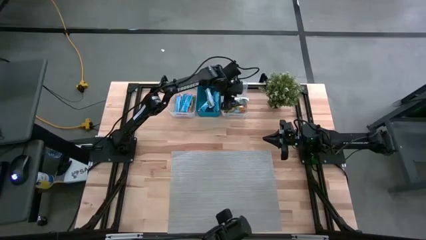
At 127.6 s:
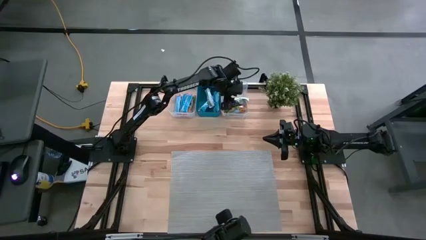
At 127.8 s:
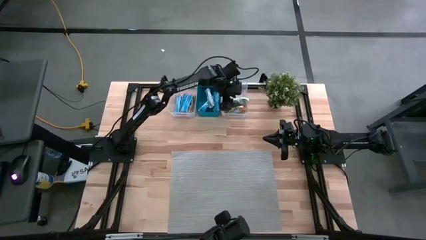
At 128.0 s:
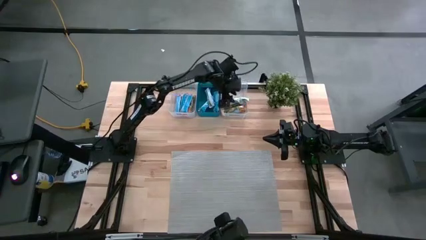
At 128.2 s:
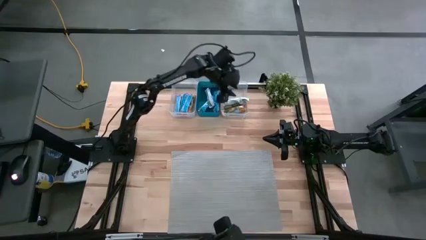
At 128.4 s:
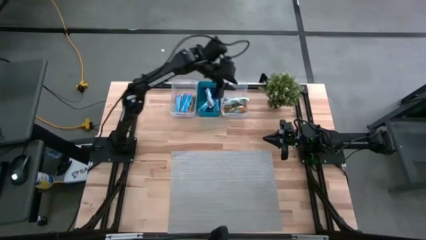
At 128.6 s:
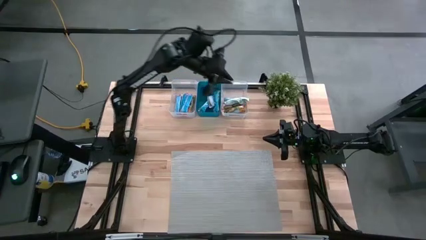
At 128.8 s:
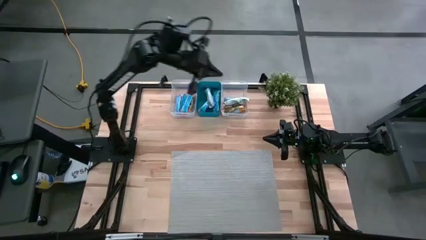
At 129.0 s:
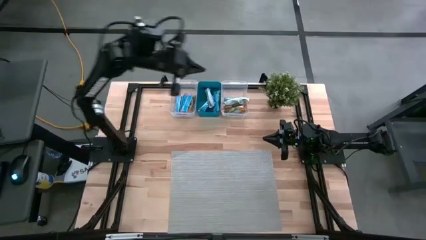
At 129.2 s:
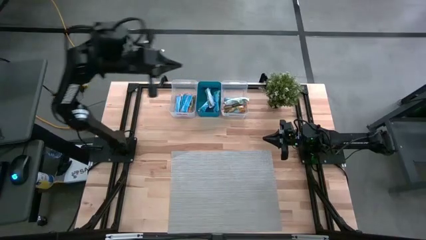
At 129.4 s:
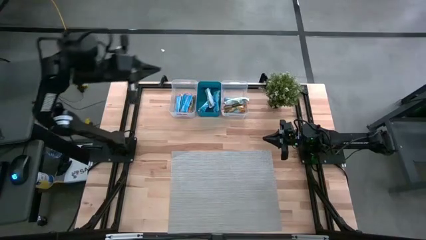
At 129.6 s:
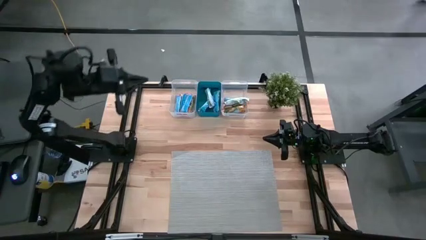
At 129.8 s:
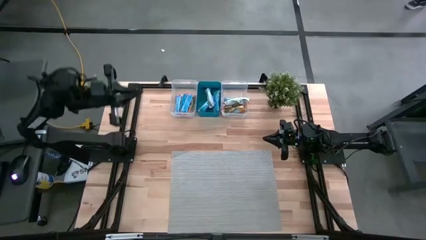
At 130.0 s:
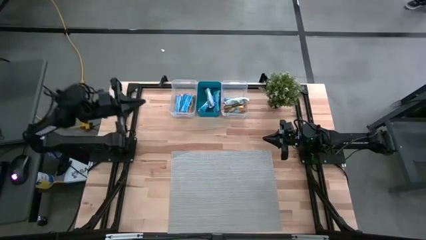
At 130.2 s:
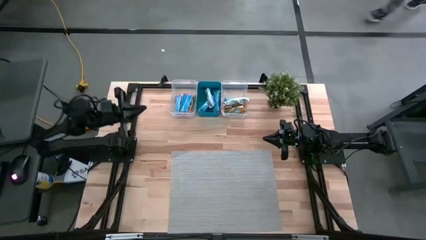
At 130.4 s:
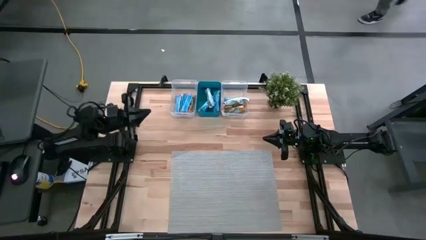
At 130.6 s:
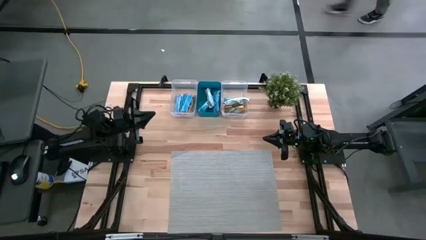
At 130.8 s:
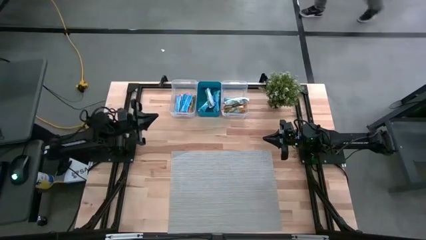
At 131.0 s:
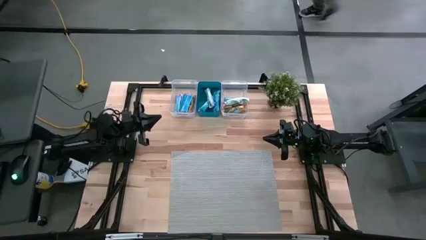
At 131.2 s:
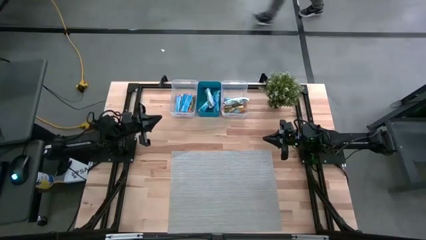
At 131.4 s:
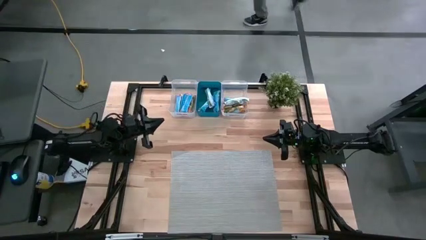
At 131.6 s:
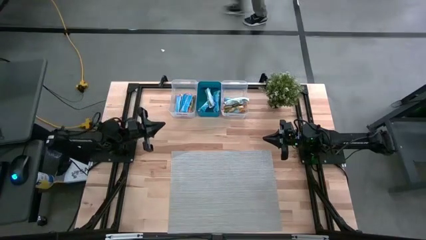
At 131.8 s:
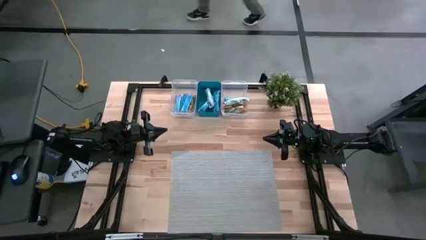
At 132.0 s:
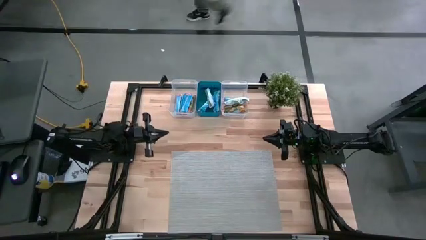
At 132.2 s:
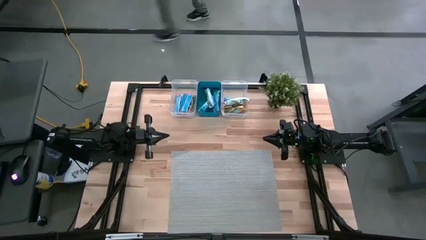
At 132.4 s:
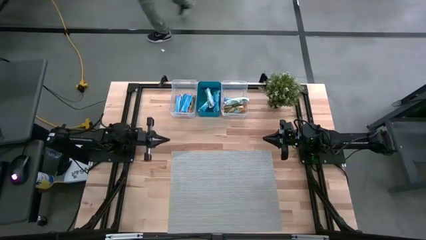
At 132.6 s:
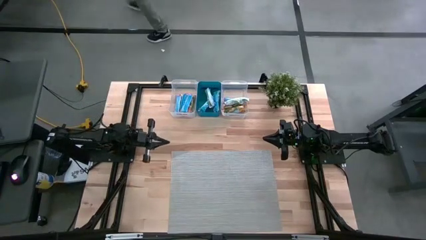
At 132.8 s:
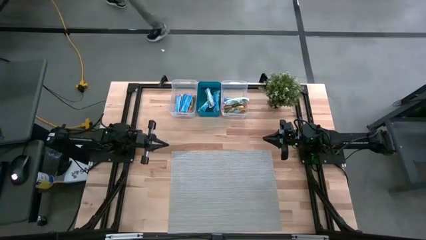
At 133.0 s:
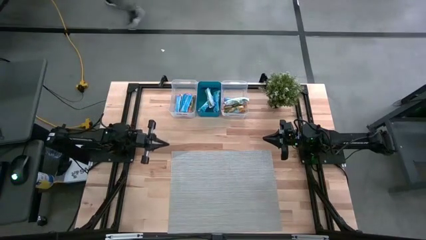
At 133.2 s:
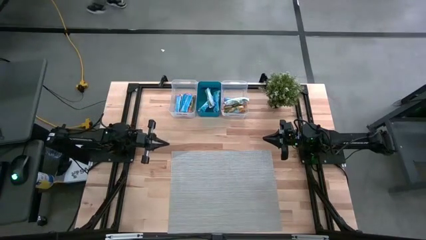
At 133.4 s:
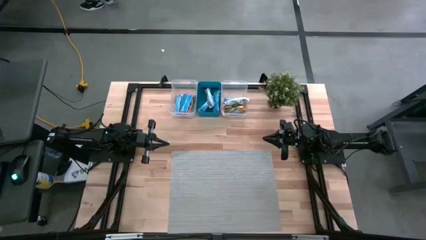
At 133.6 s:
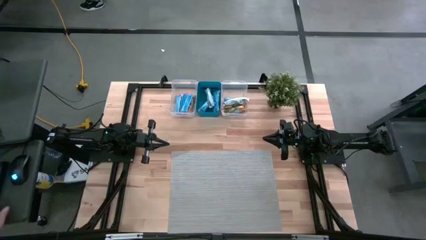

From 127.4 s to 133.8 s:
Task: Pick and place Granola Bars by type
Return to Home Position

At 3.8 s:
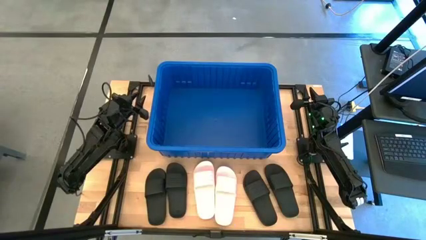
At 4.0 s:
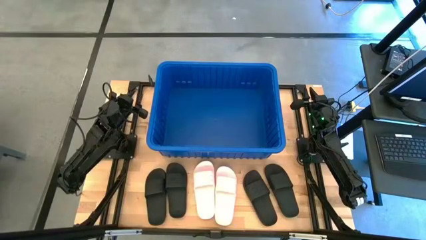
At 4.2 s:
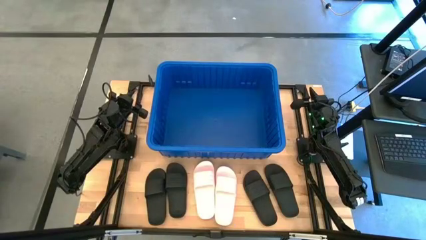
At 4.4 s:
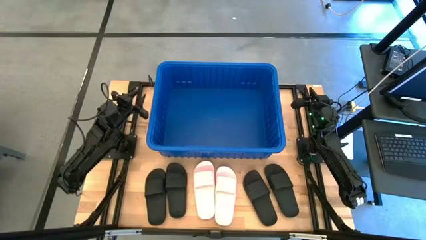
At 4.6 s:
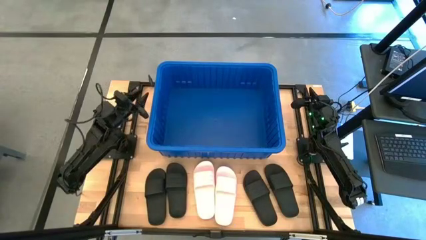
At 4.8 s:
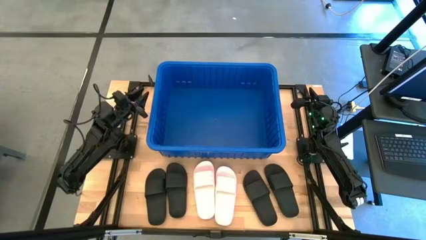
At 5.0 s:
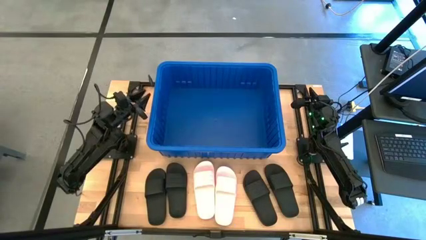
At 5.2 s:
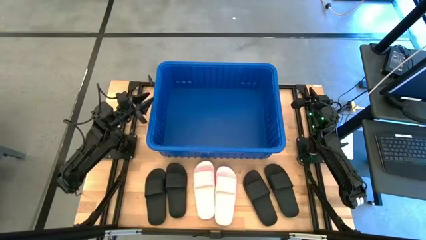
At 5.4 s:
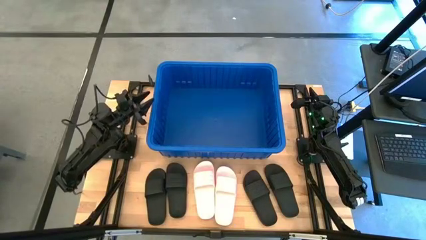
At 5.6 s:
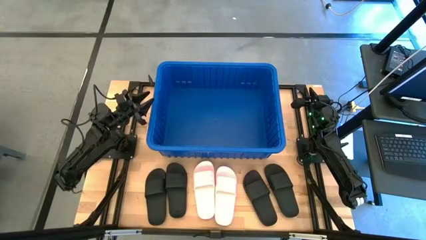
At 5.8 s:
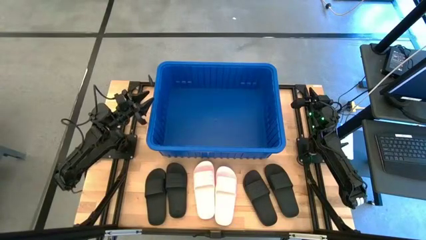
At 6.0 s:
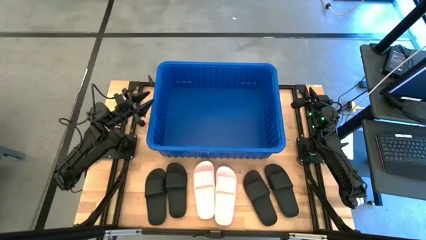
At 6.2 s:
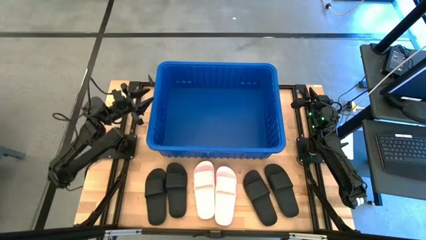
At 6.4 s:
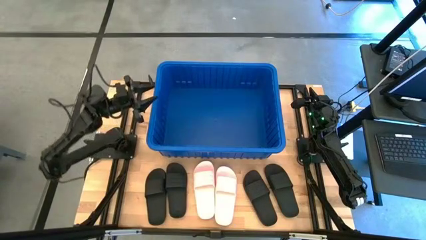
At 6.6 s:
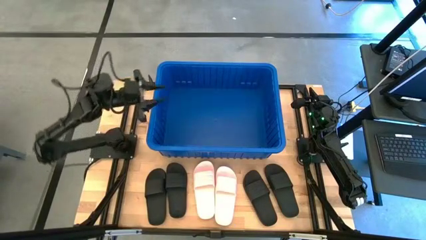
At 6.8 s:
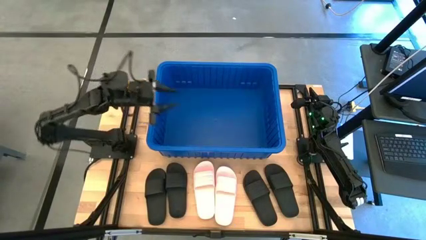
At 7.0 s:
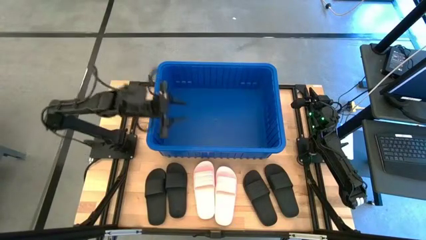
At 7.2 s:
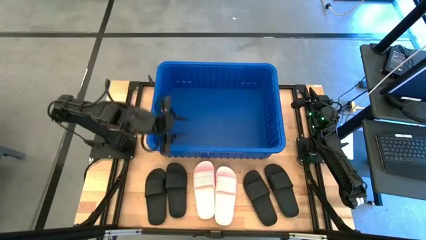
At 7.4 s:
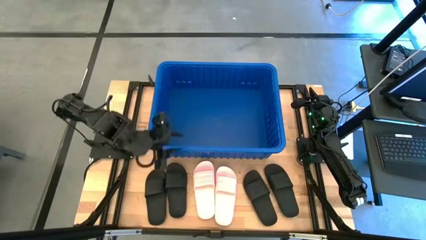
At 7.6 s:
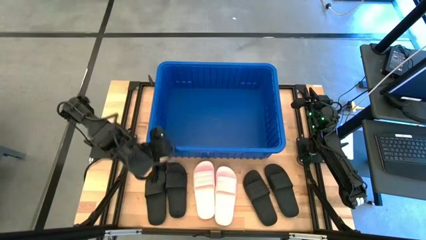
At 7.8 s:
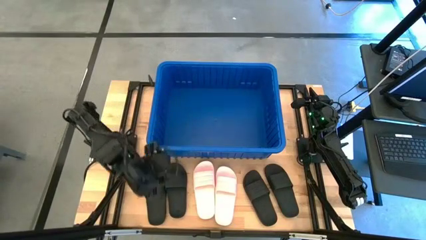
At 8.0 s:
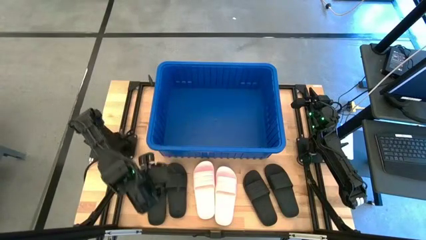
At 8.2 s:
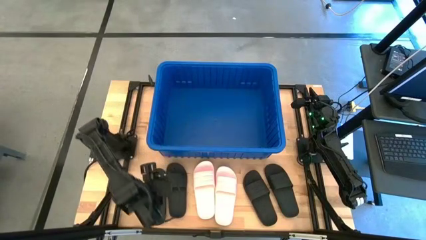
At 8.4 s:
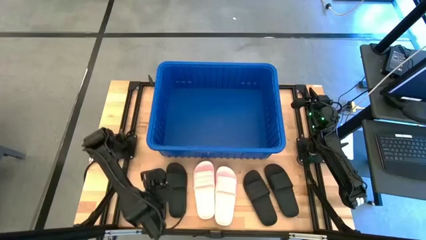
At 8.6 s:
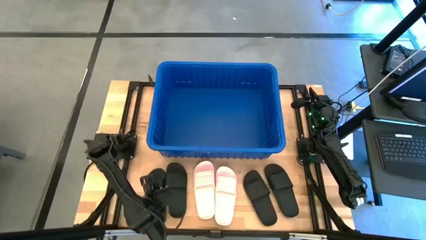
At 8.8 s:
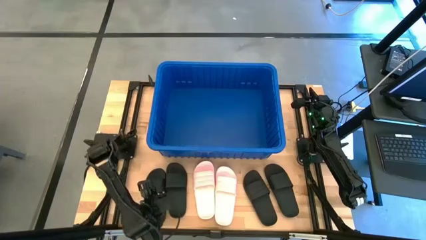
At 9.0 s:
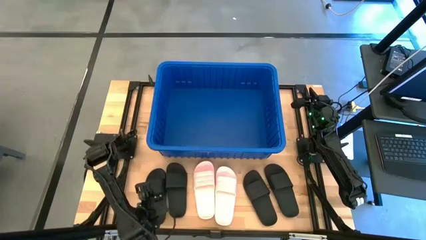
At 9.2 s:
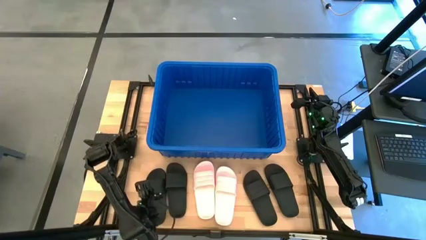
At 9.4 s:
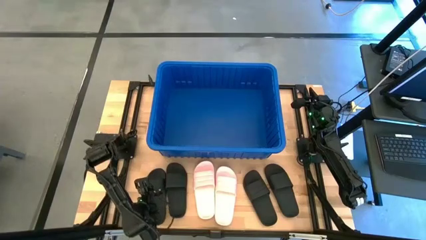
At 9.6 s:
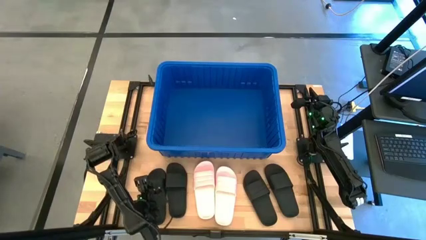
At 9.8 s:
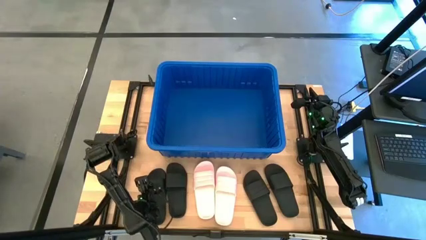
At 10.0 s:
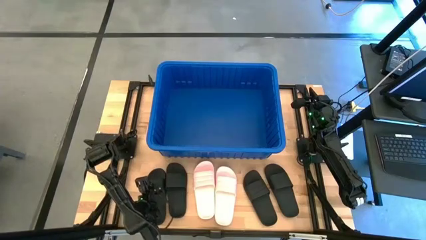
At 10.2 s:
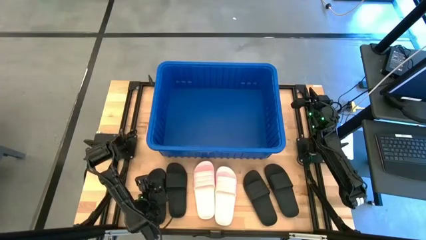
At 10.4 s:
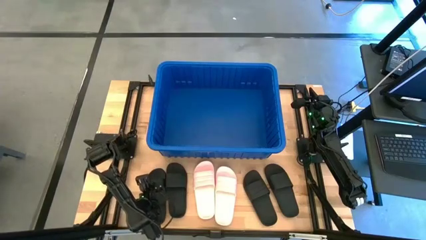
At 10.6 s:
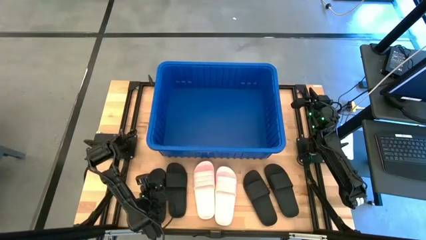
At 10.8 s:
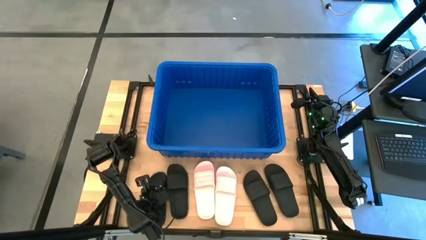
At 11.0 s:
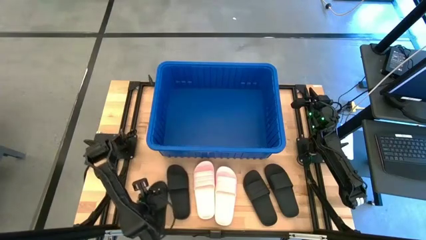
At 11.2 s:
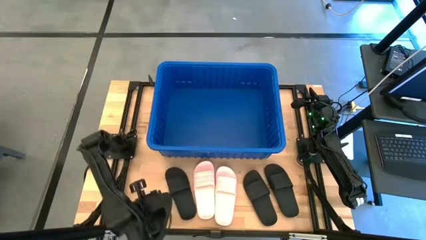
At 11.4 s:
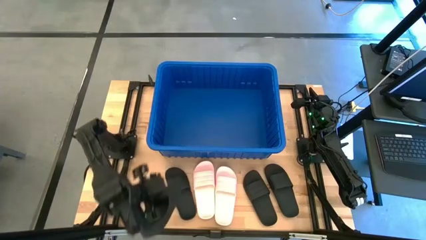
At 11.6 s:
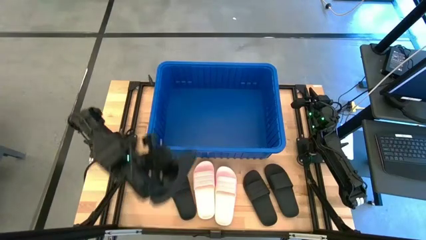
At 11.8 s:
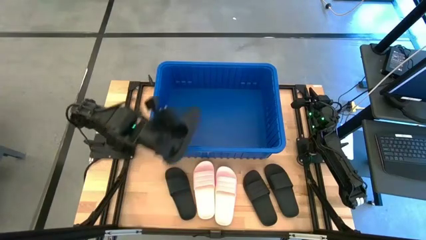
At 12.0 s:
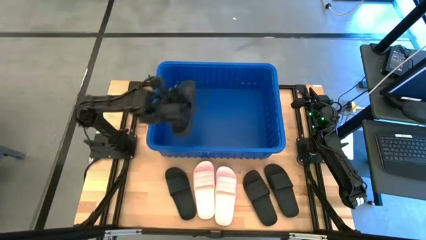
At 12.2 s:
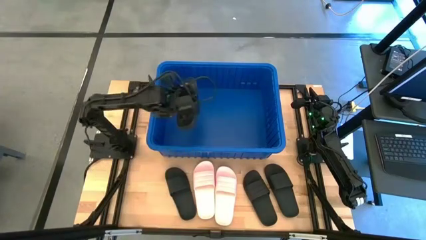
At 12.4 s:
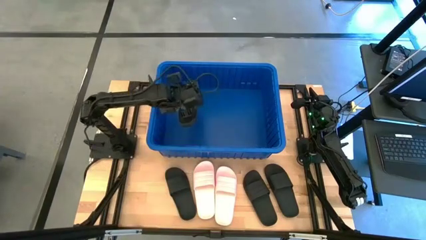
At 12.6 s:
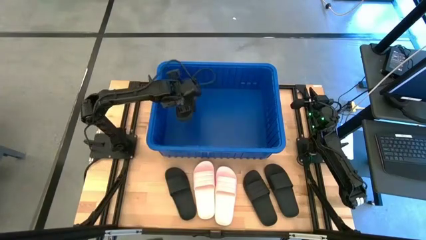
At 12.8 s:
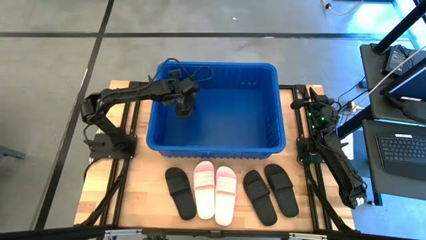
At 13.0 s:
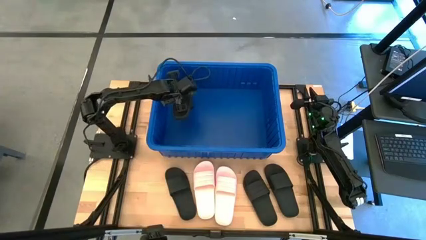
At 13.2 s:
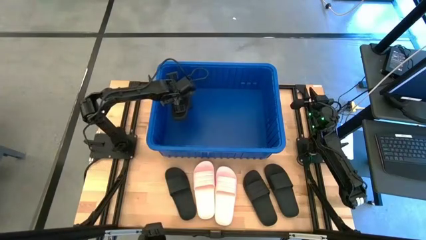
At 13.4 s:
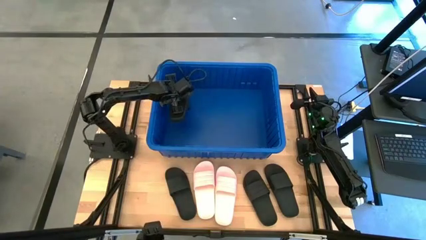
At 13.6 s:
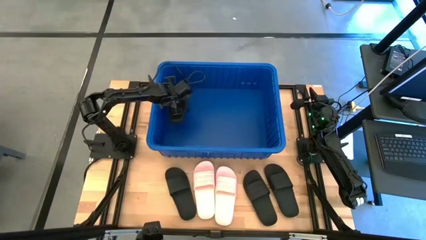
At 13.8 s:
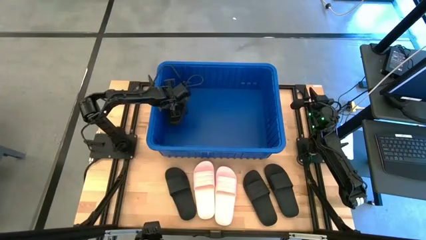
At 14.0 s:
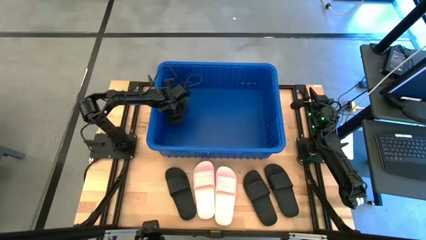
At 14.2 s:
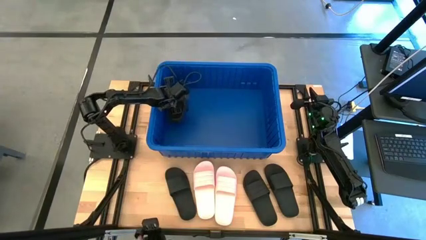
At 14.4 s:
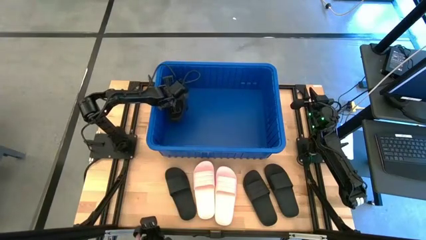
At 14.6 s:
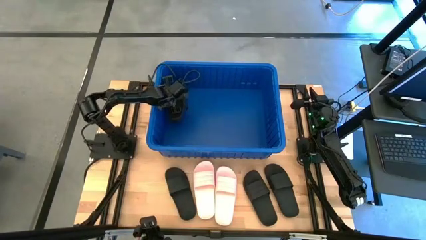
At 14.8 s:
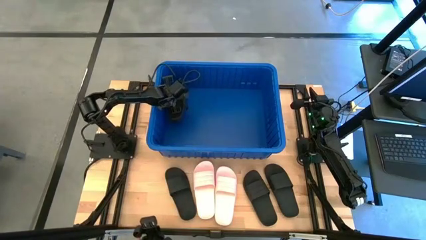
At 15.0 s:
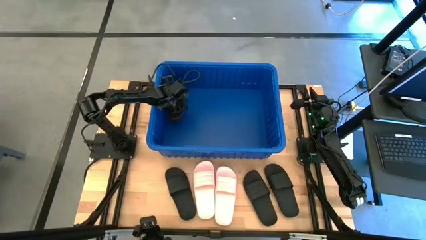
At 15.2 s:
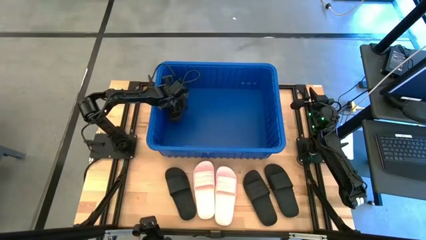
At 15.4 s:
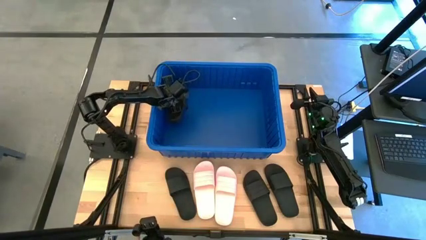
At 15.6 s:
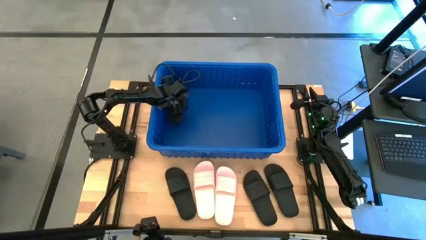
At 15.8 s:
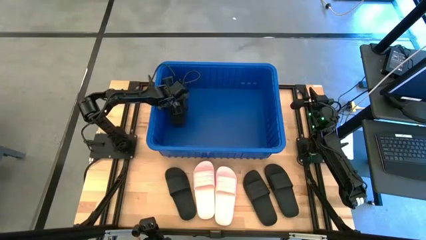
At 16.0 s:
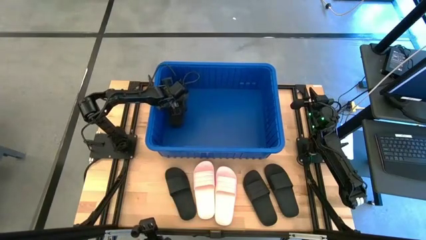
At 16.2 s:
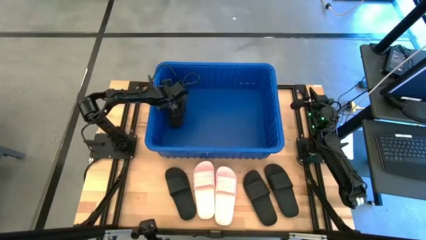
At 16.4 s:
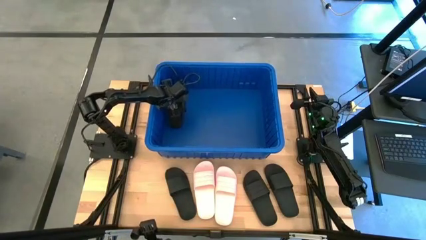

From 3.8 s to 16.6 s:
Task: Pick and place slides into bin
Put the black slide into the blue bin
